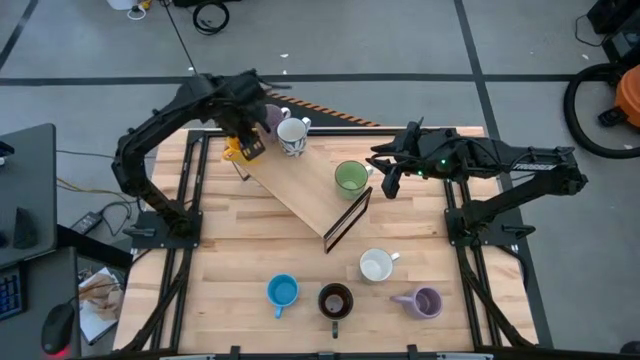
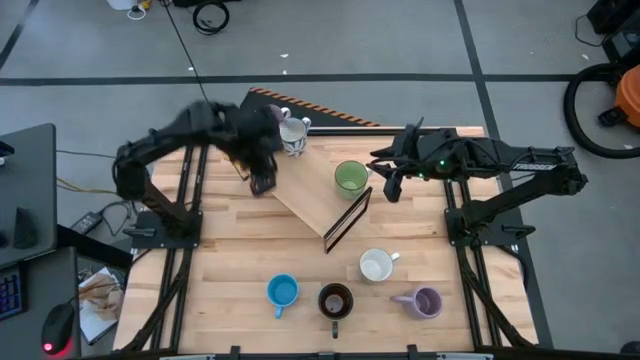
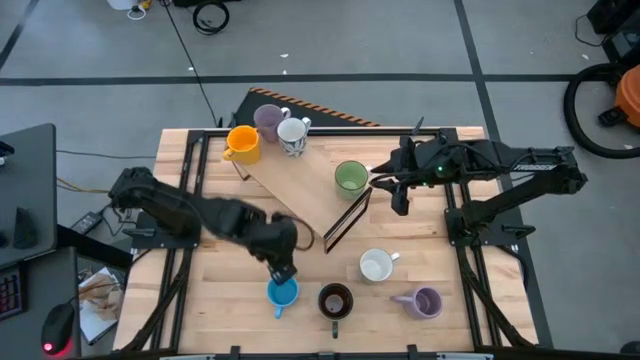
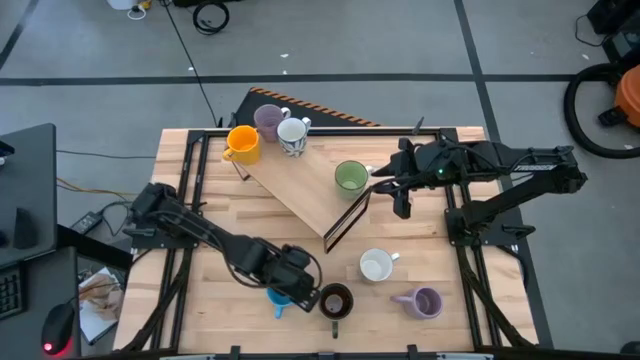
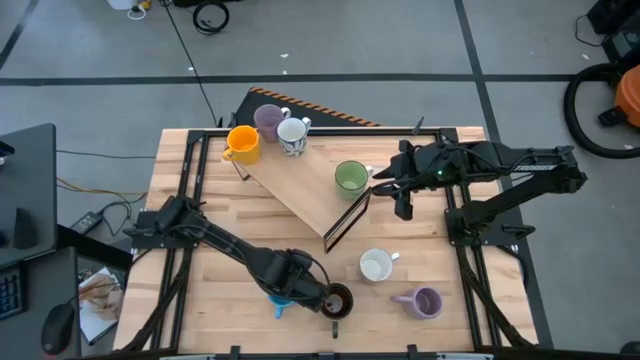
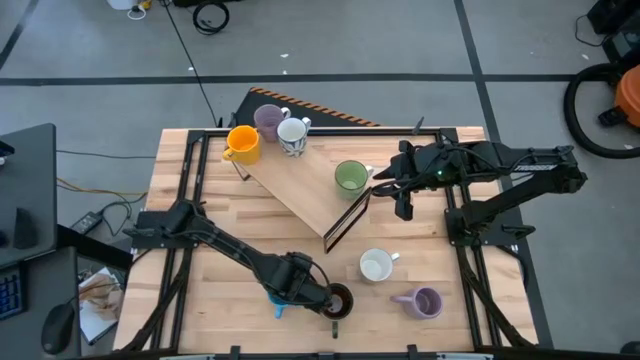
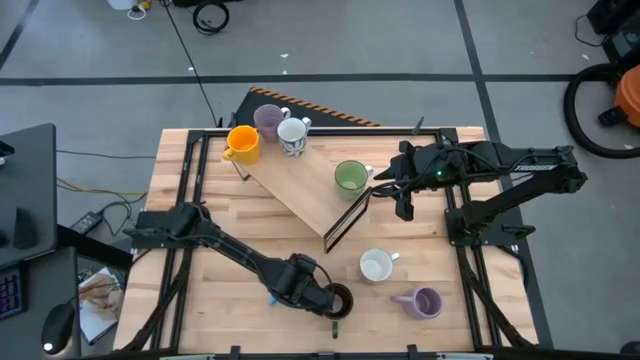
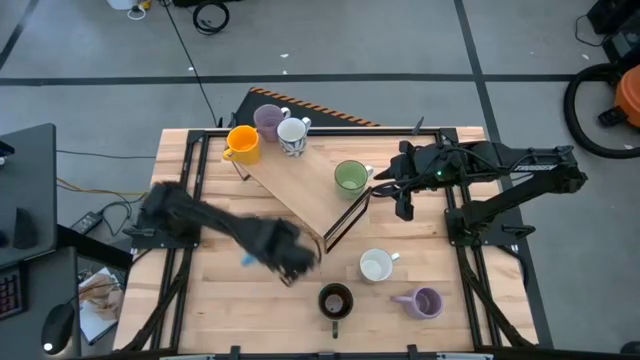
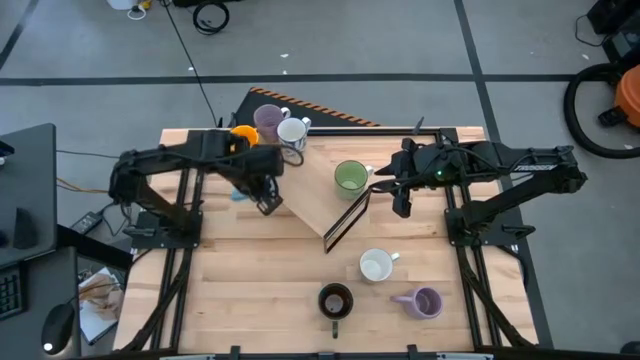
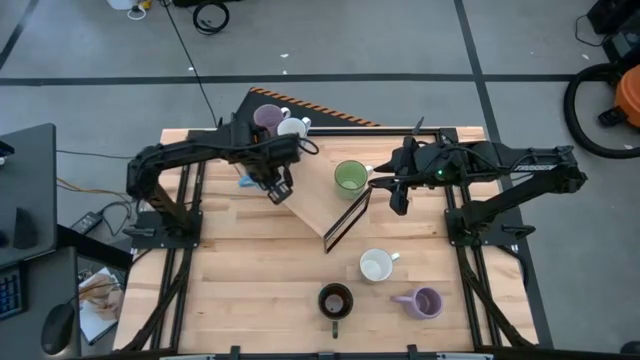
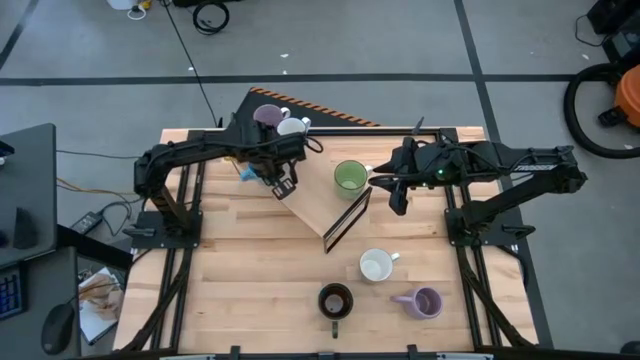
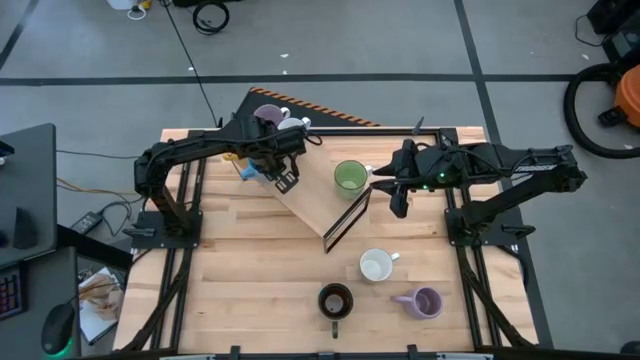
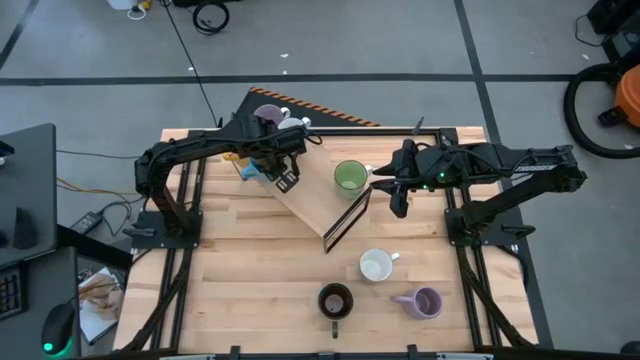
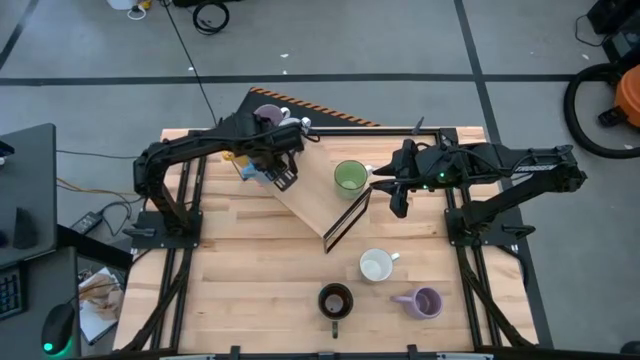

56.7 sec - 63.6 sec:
Task: Place coffee mugs
Put the light blue mug on the shelf

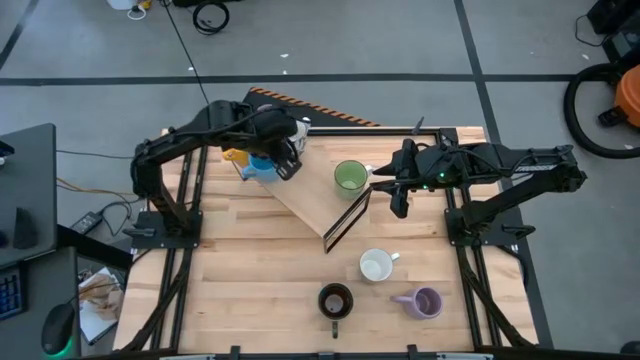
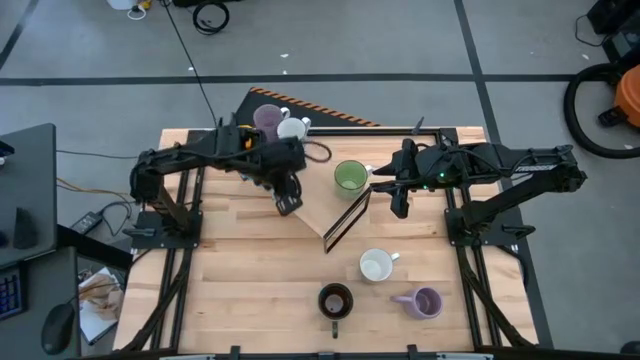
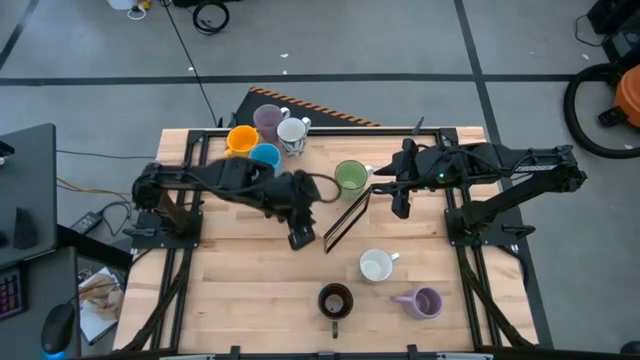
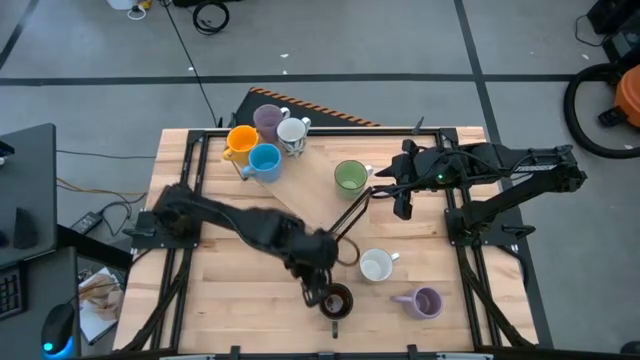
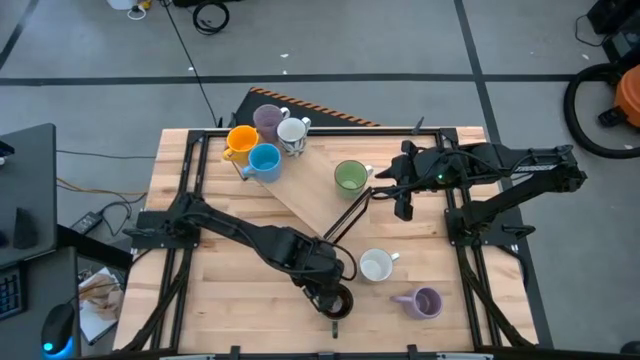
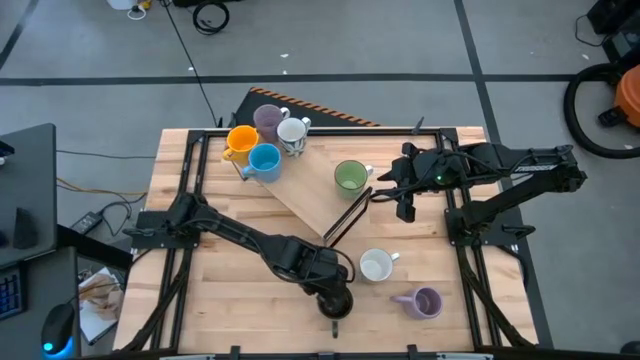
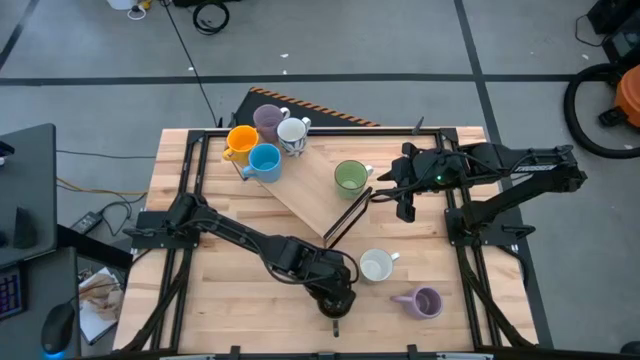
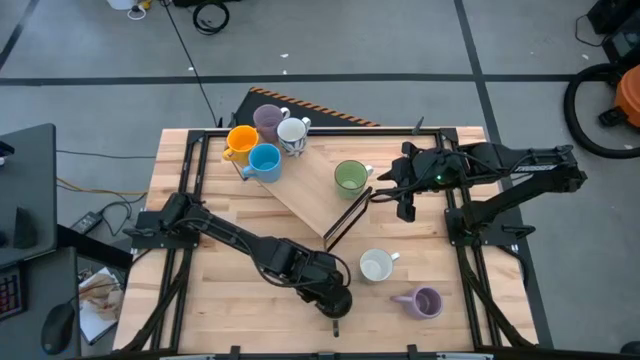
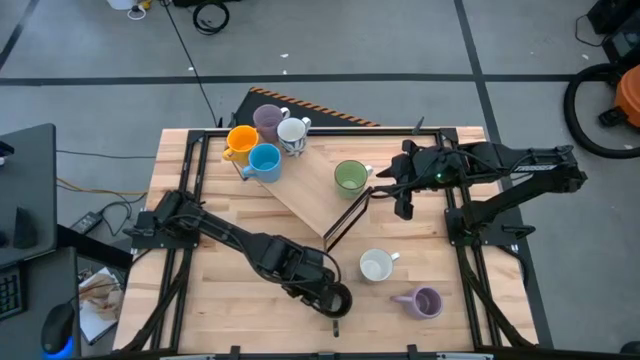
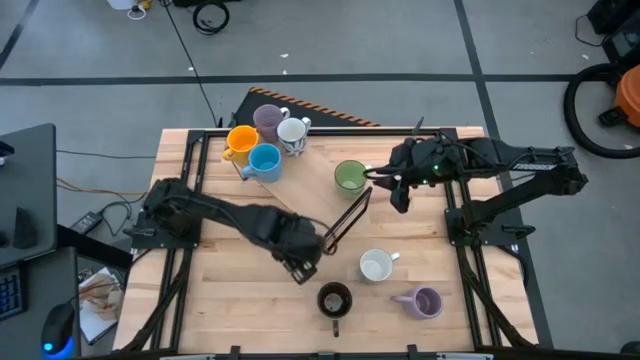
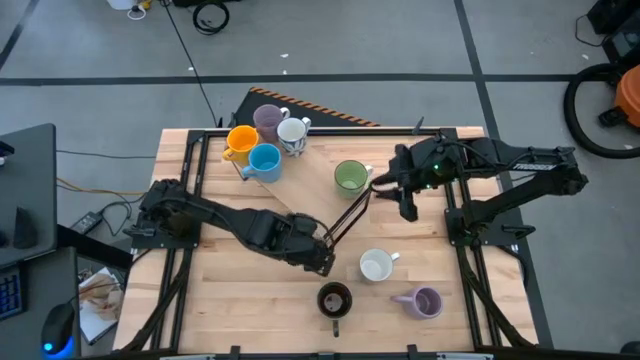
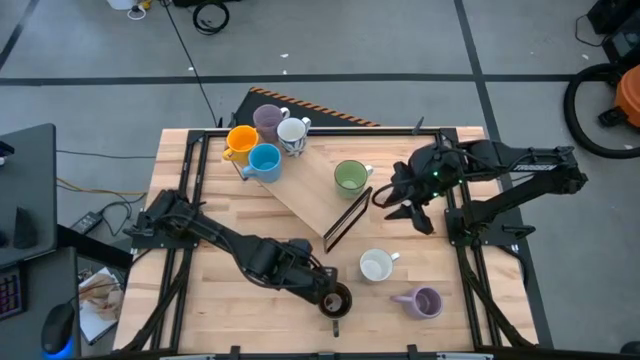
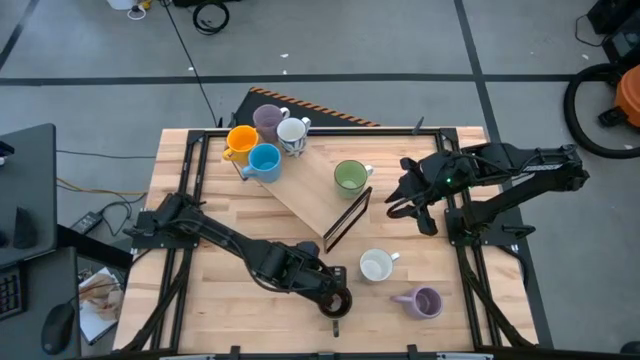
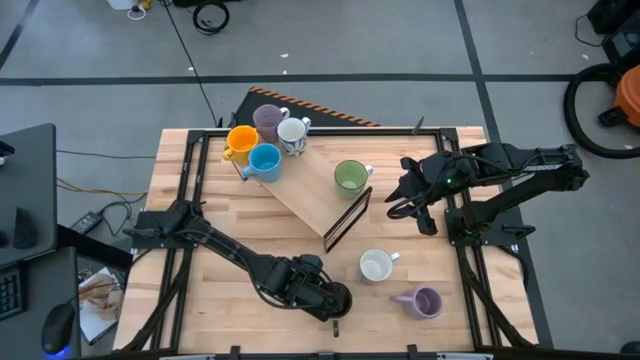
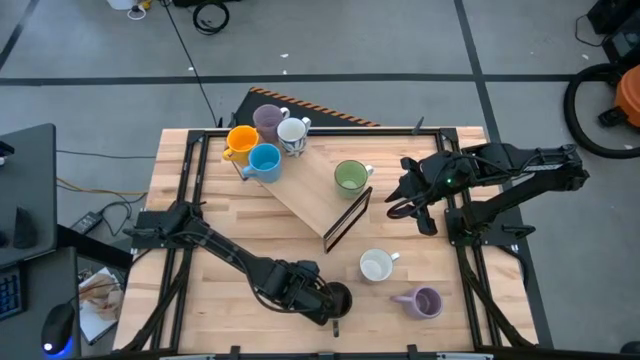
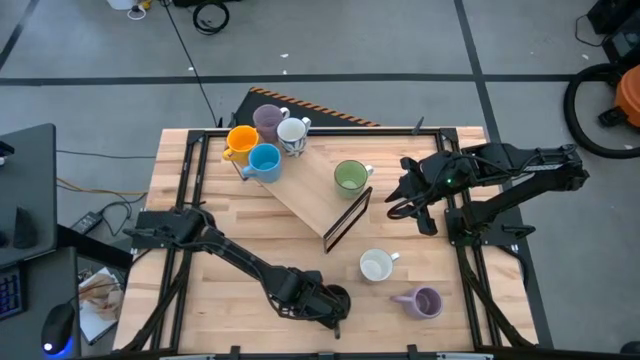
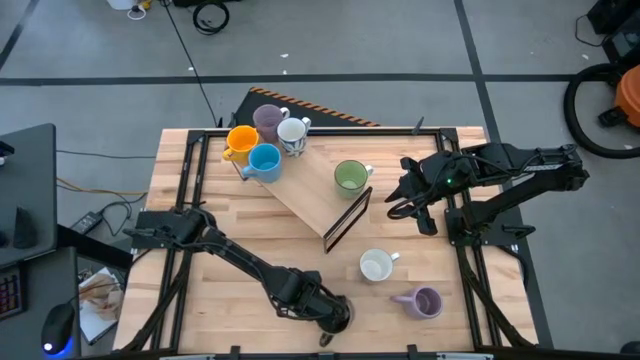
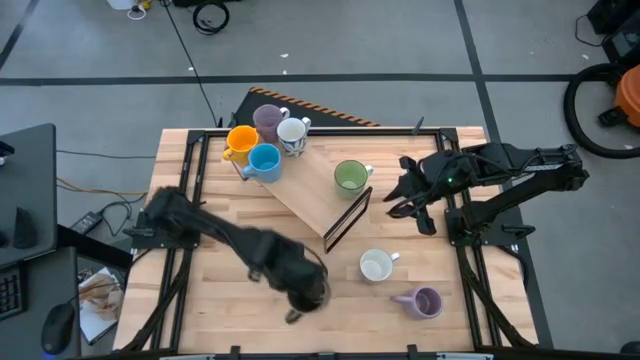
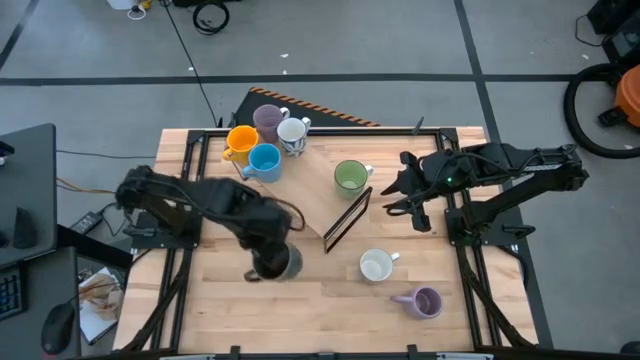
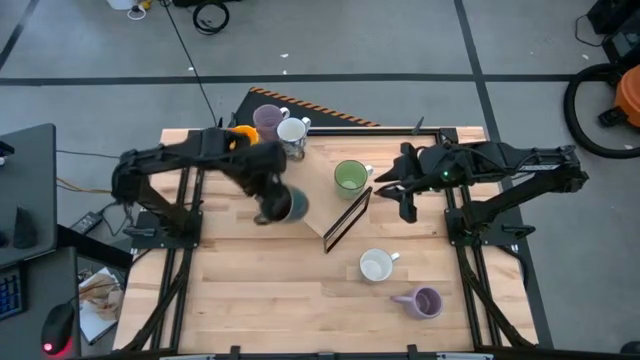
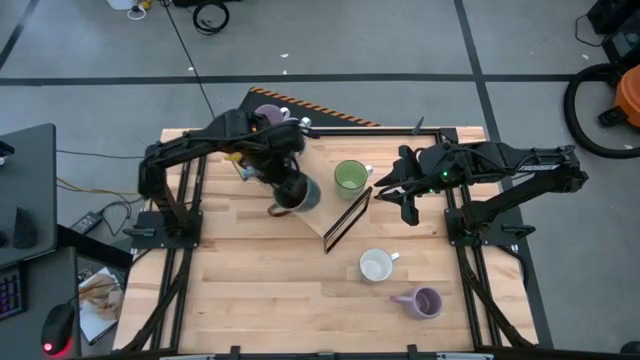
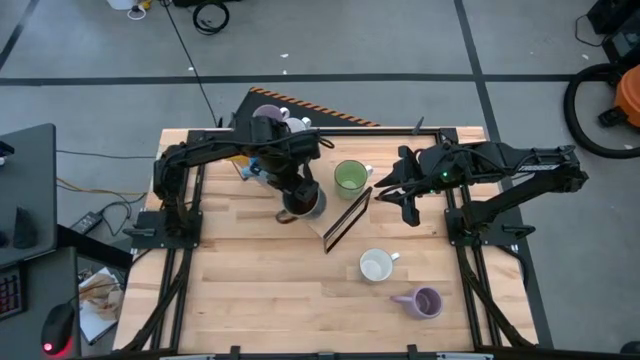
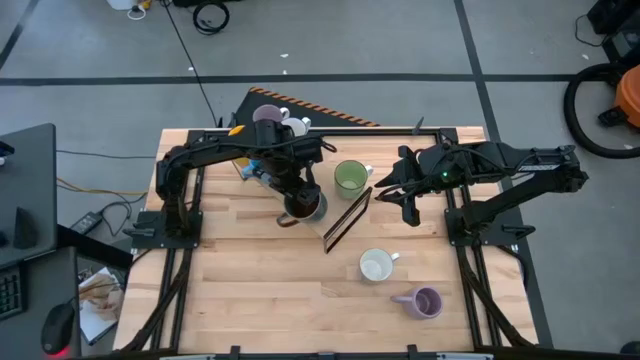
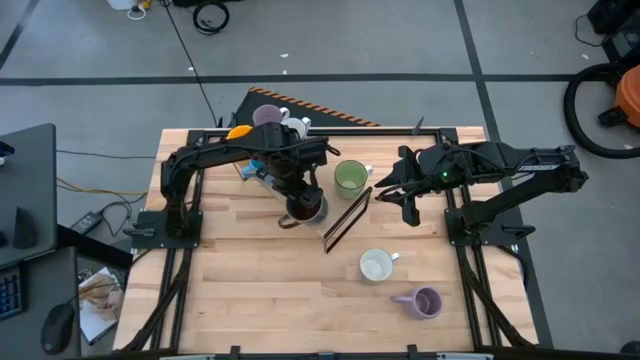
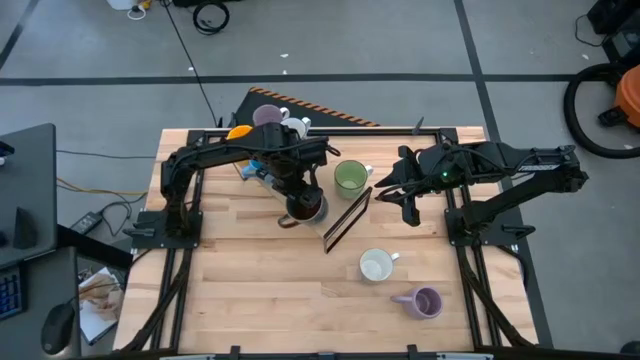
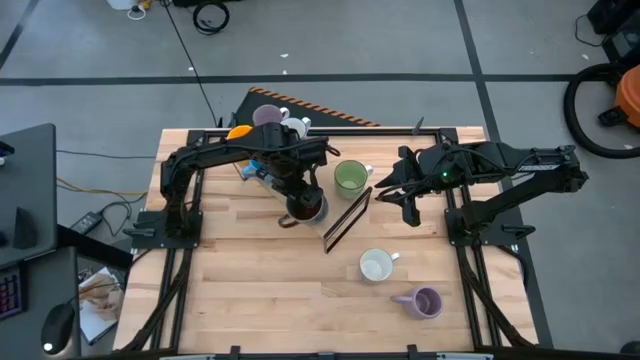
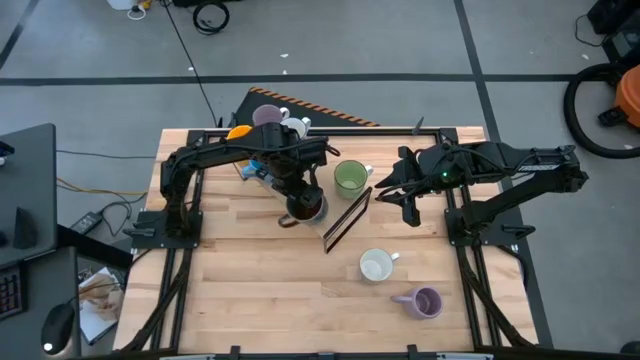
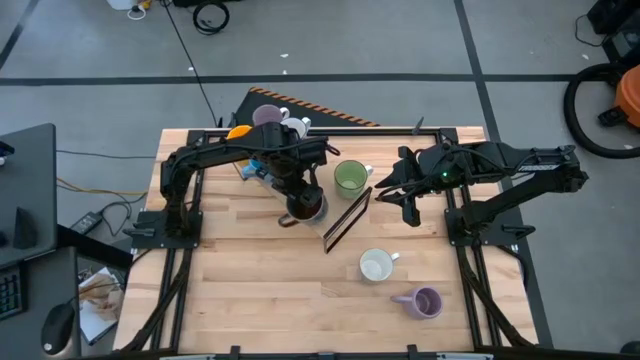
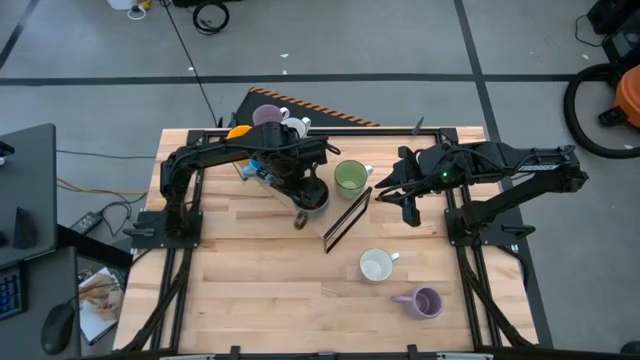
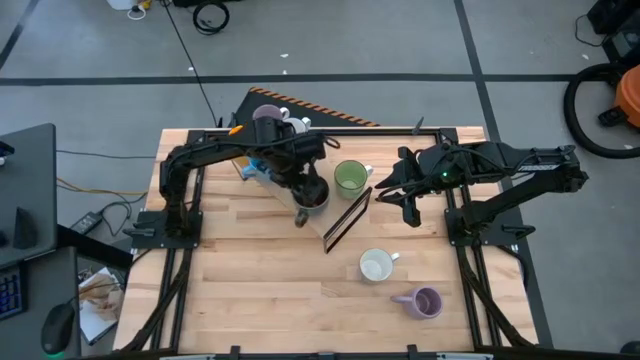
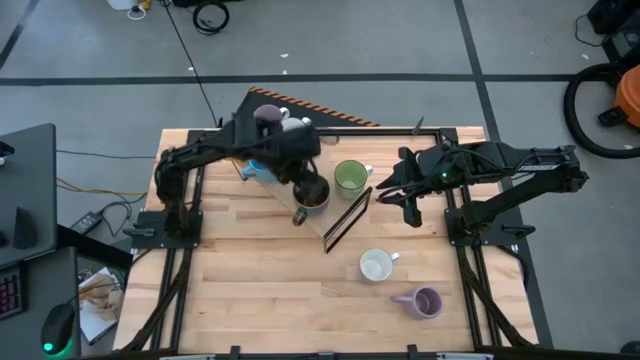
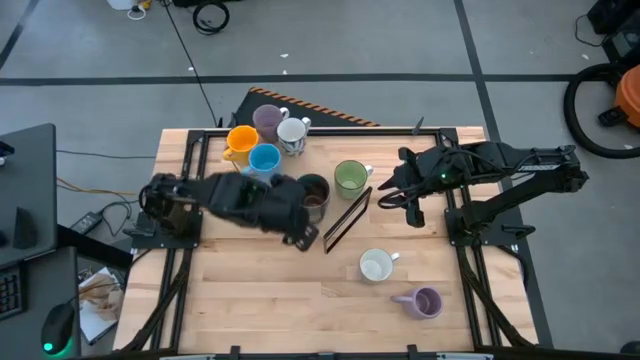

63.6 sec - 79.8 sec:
Put the brown mug on the shelf
